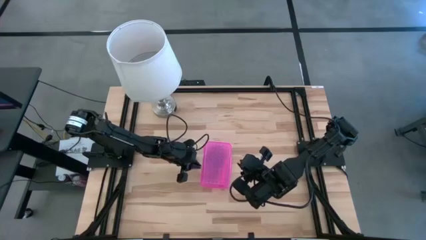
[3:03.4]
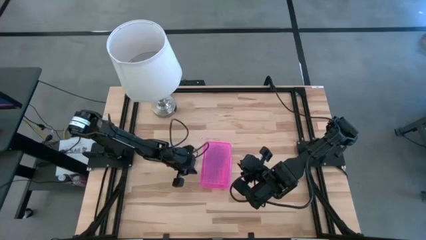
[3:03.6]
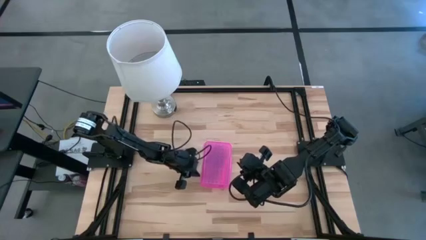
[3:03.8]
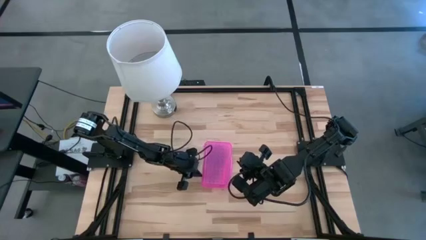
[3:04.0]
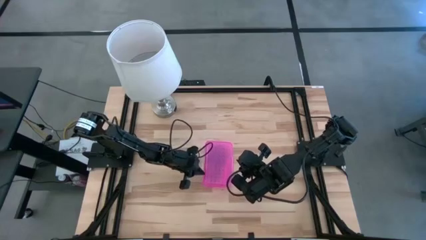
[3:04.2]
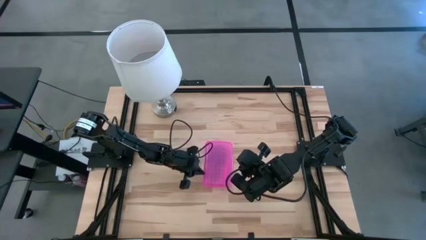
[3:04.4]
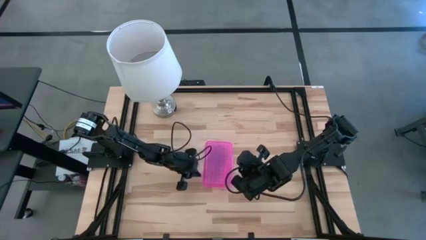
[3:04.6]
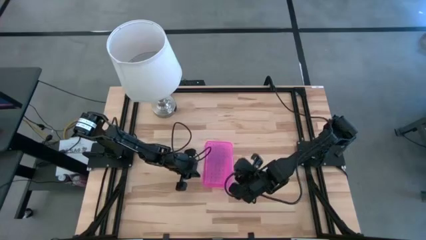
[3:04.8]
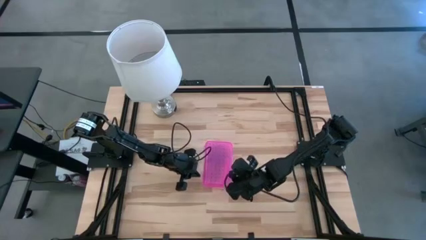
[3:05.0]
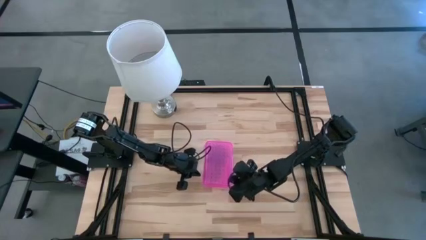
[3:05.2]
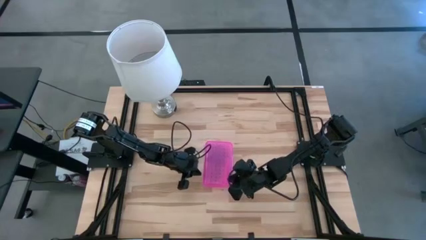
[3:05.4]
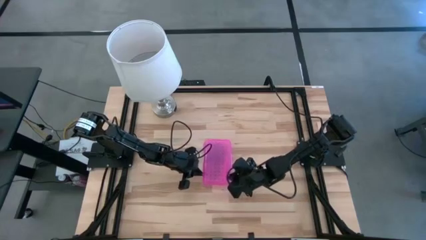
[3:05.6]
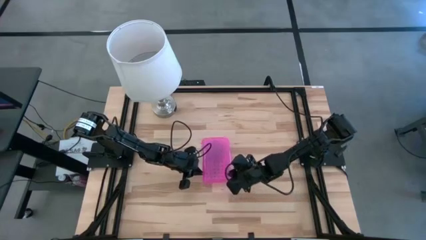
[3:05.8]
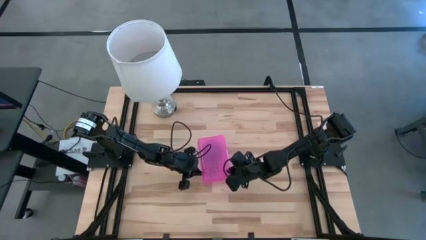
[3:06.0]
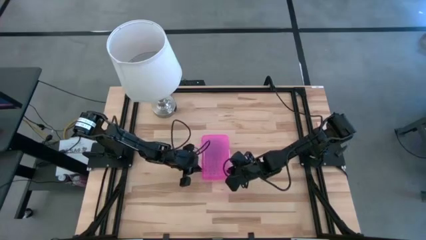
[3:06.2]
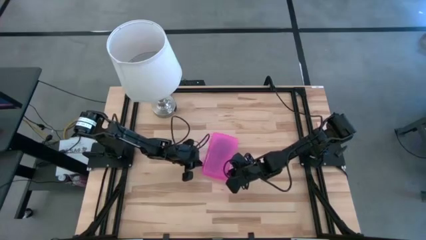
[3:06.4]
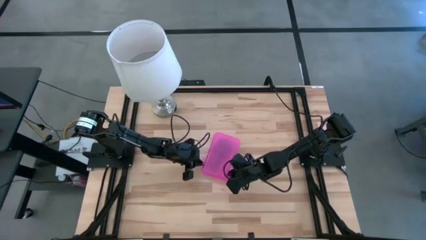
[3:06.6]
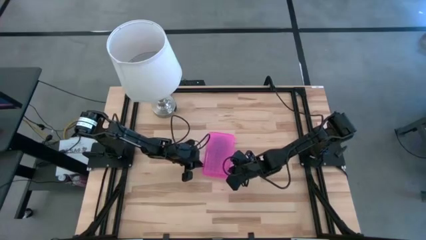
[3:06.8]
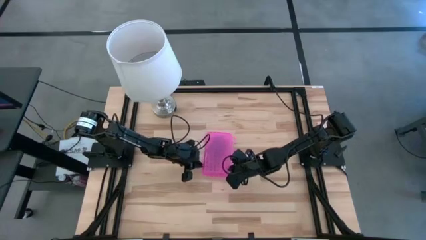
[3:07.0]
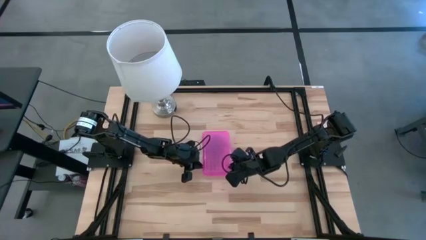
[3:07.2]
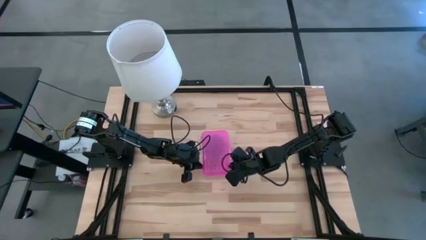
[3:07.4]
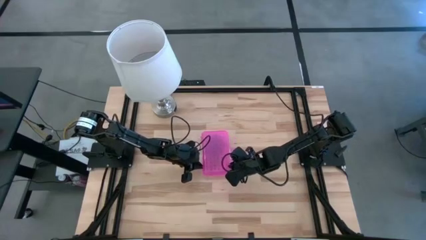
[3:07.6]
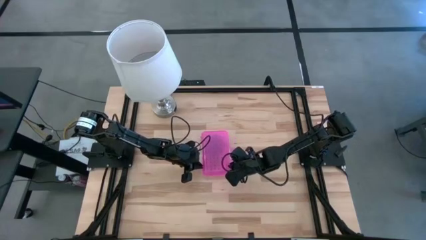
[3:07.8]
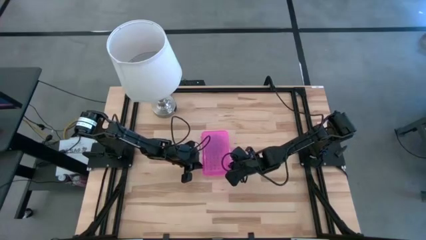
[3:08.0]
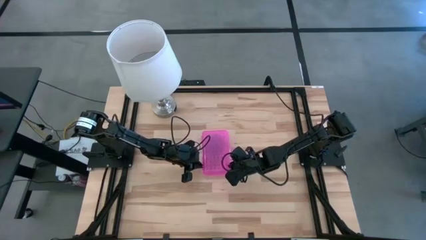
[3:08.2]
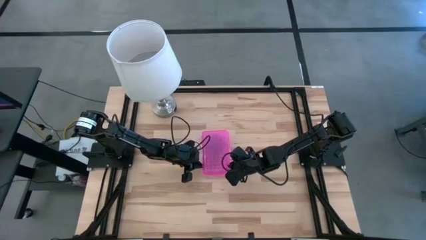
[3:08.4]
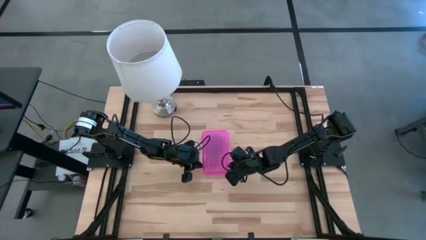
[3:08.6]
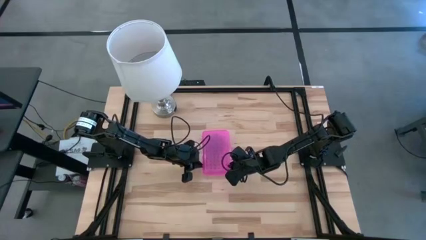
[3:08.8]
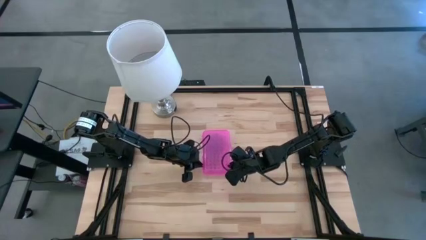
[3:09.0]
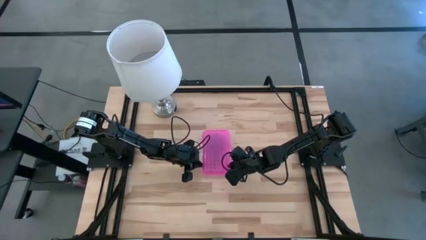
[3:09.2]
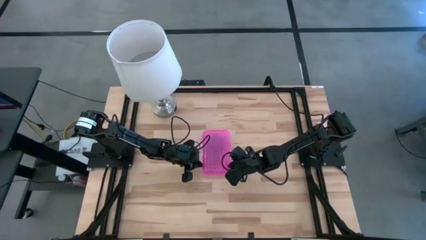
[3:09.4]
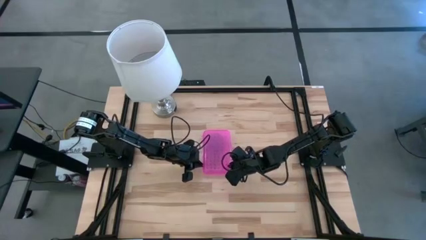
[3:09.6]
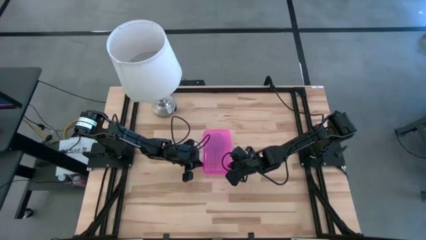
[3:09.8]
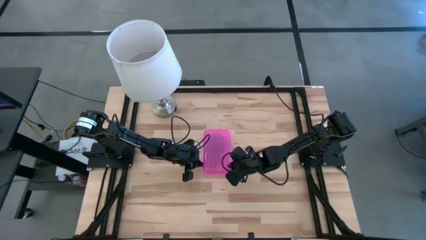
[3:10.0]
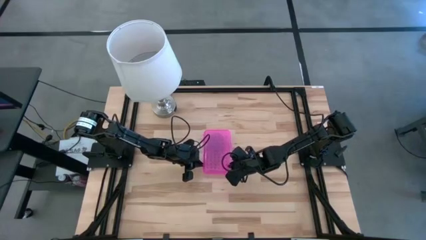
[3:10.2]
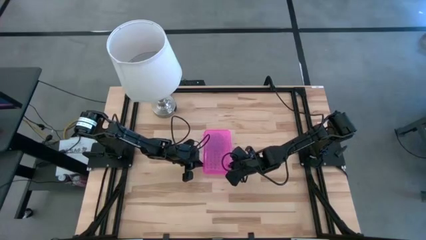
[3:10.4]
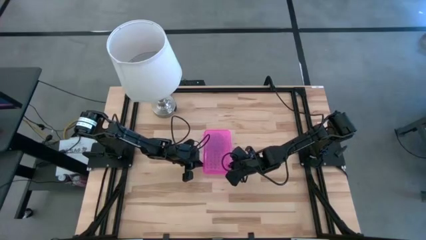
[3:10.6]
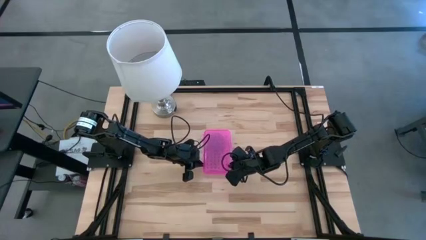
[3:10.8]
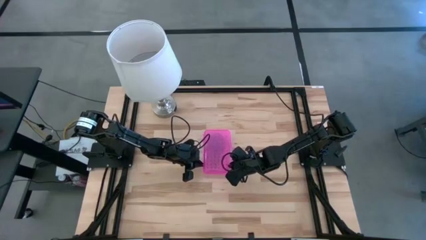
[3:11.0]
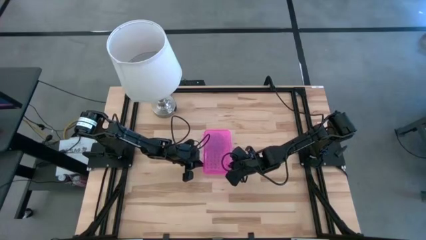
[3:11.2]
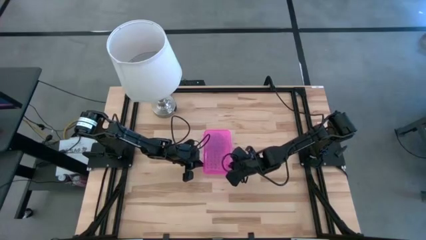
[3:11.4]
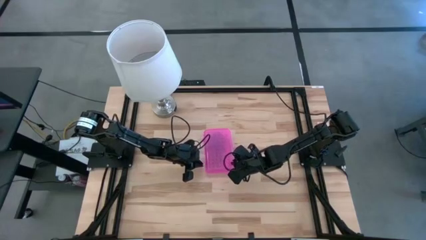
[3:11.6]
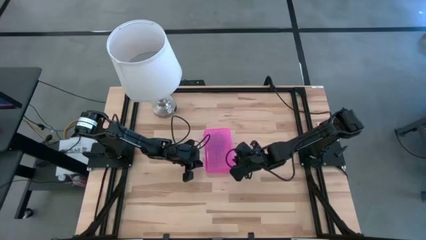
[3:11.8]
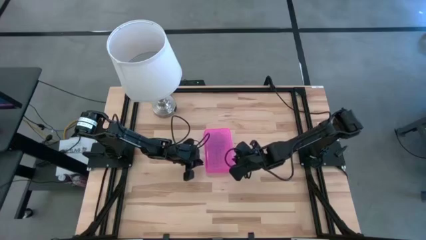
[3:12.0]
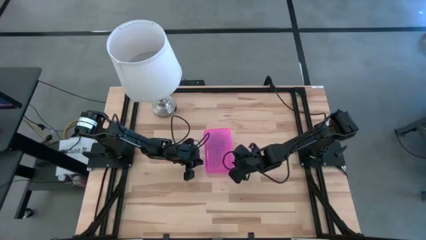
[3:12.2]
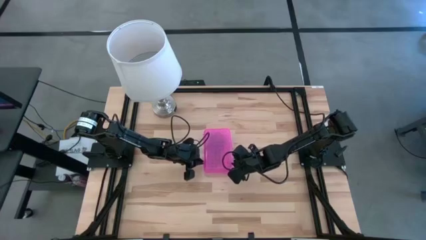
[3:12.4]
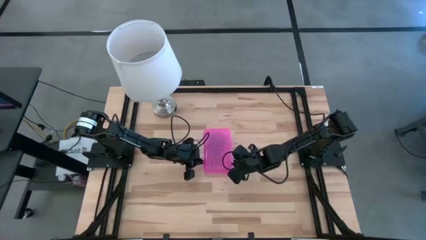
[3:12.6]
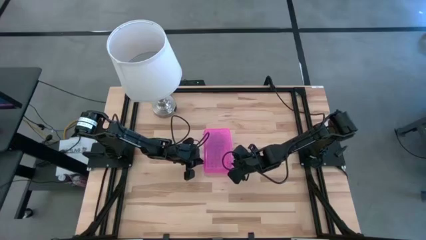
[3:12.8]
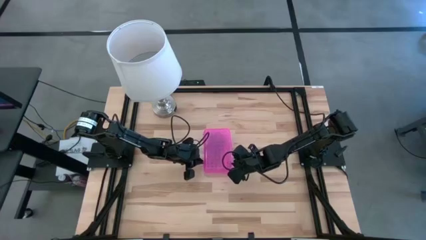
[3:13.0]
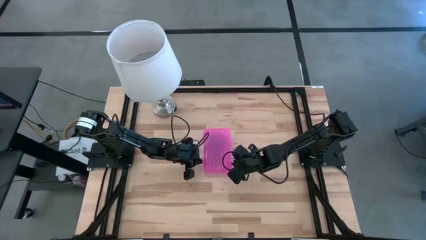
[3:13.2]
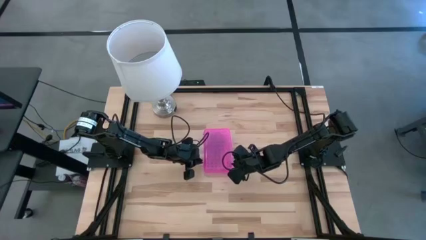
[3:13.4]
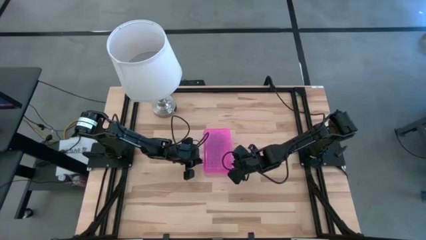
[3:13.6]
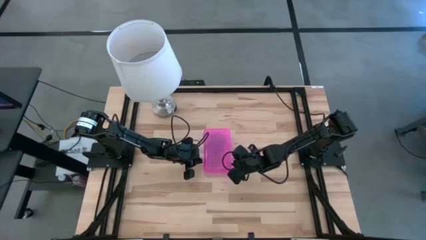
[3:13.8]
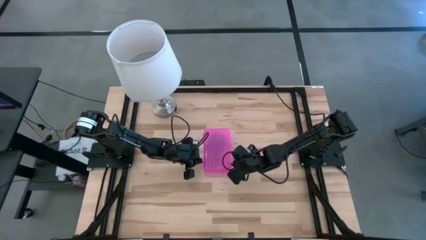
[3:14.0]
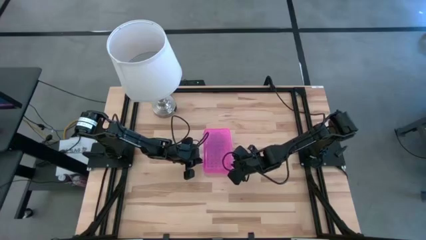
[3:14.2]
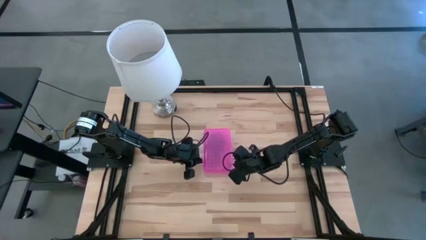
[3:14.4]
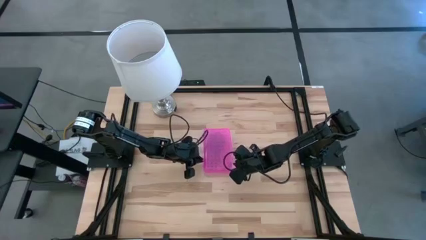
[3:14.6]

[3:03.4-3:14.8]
Task: Pick & place school supplies into a supply box
Adjust the pink supply box

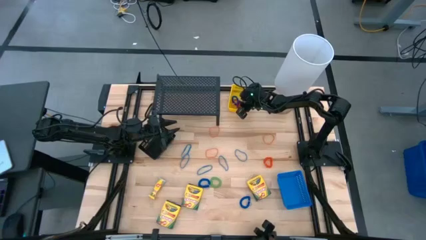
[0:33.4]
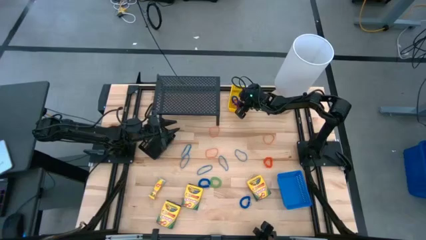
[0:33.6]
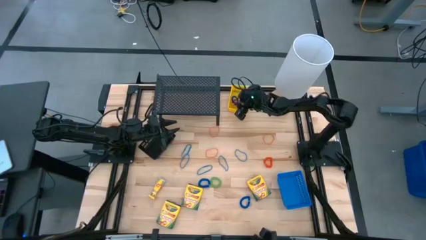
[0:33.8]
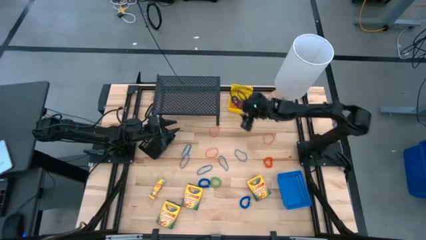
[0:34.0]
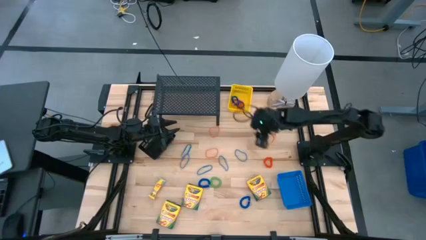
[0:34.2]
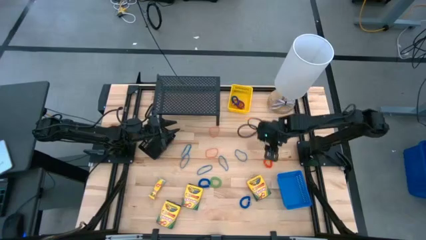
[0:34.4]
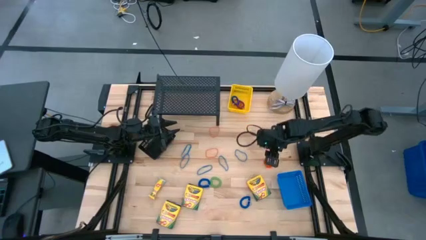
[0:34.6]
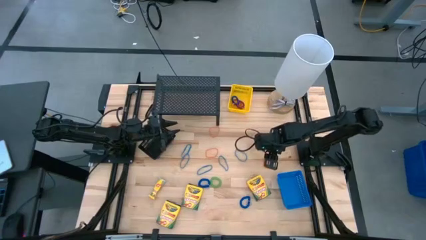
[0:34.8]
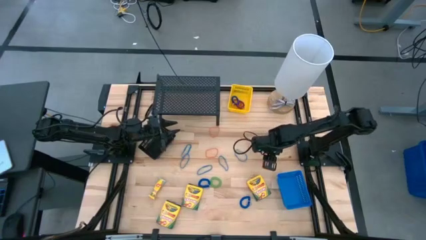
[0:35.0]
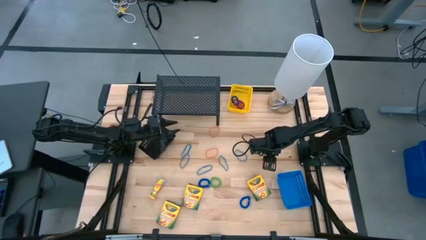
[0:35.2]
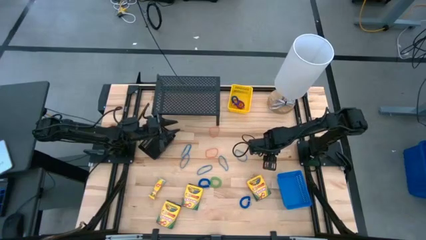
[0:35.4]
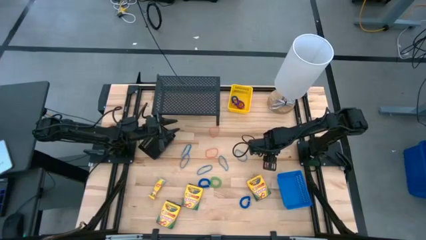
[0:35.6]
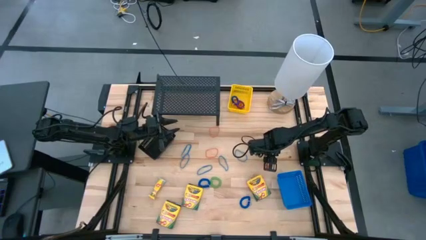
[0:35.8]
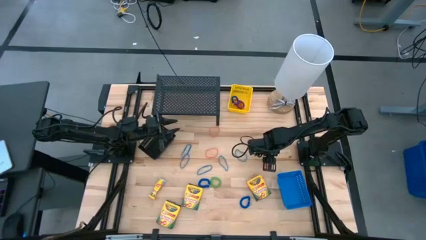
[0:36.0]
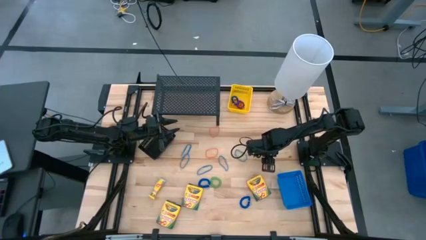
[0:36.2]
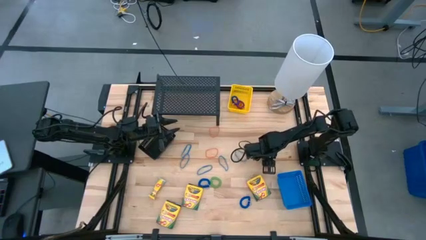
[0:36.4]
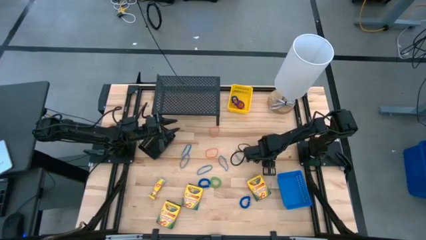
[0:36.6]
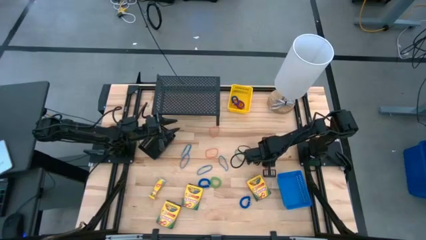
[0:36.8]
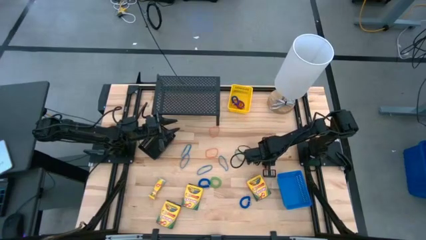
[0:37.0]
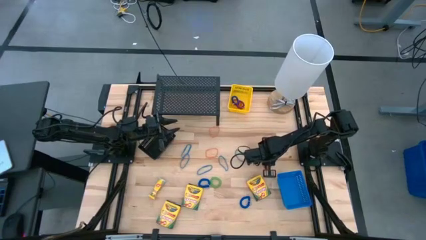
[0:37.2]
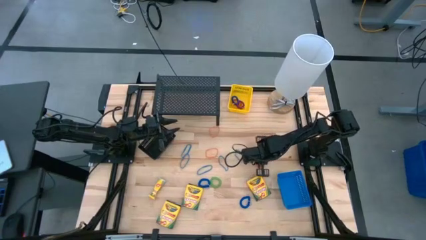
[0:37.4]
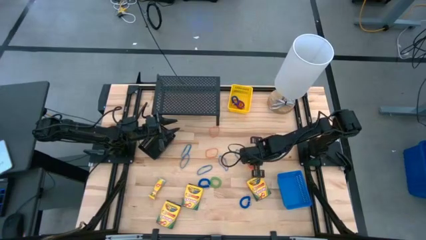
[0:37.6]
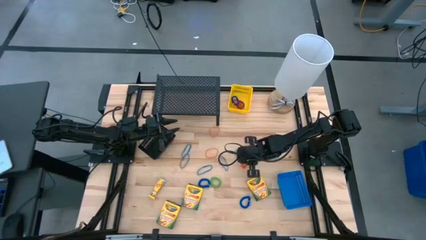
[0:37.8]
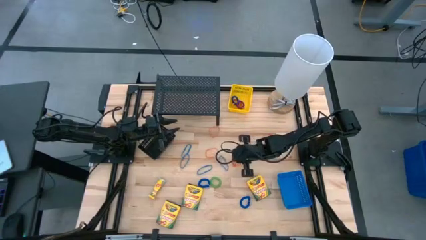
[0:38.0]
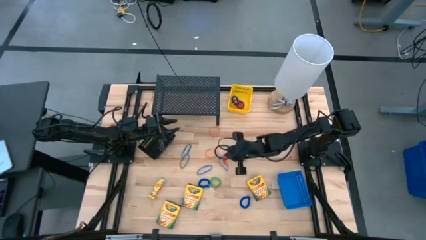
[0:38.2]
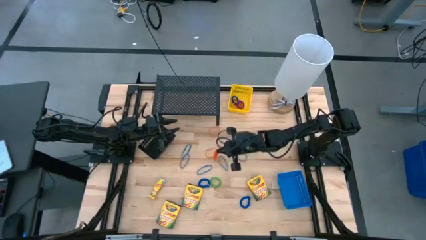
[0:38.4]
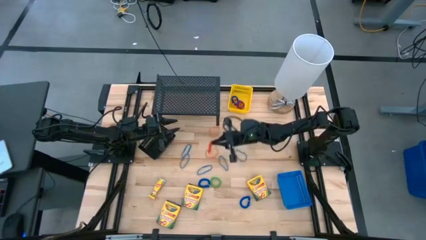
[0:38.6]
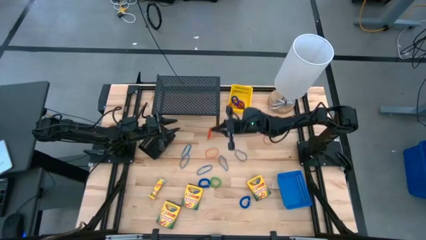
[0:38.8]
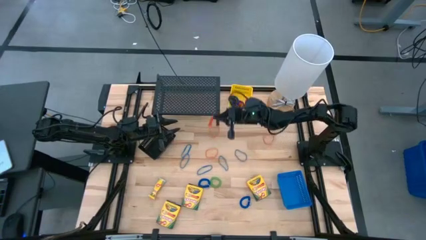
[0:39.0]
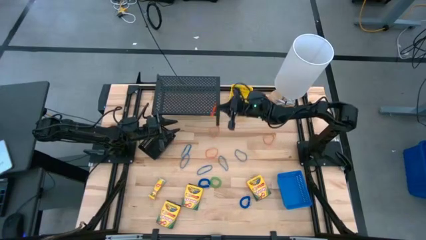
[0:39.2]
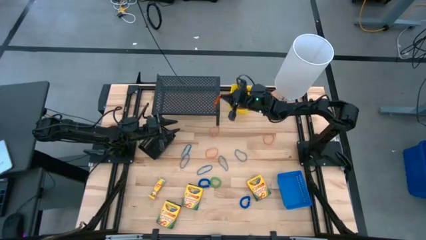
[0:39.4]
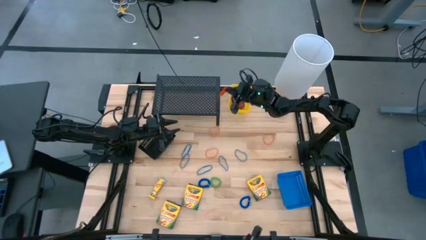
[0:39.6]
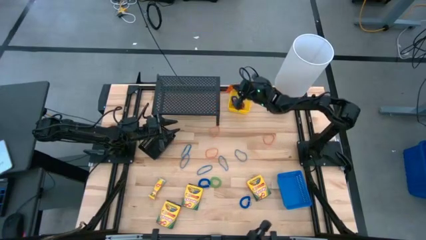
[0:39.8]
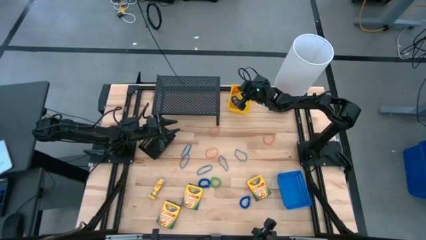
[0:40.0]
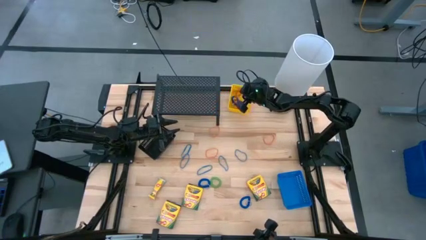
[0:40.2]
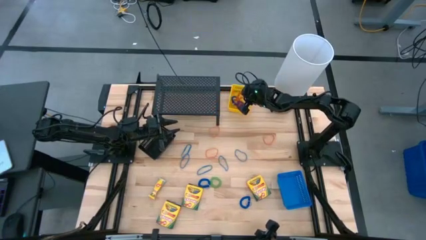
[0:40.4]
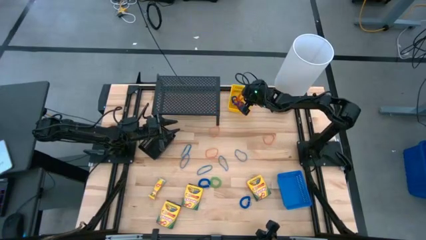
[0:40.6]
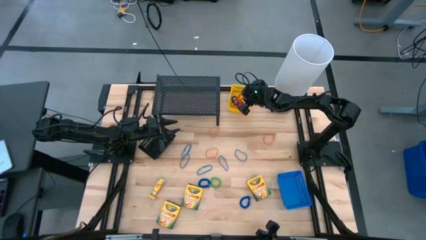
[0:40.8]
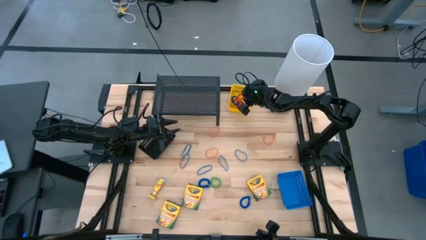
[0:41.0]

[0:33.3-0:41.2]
Task: Pick & Place Office Desk Supplies
Put the orange spring keychain into the yellow bin
